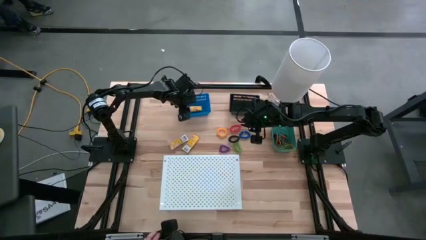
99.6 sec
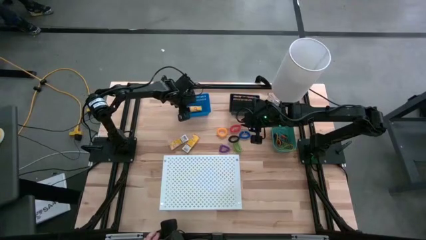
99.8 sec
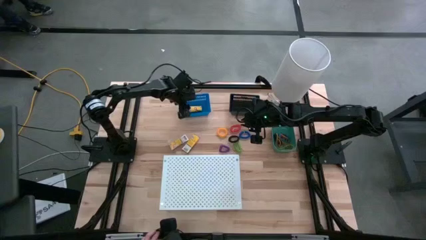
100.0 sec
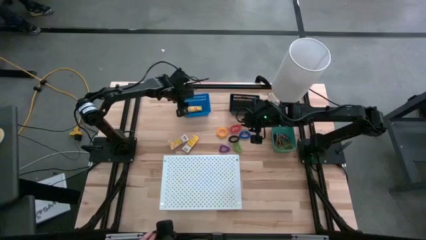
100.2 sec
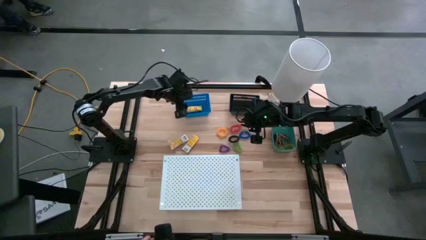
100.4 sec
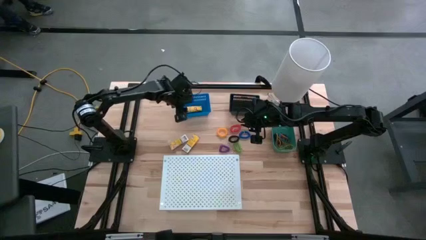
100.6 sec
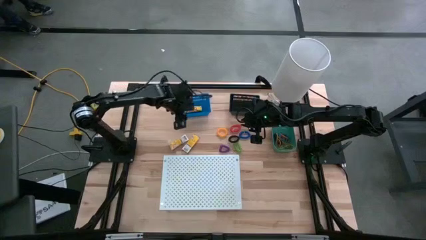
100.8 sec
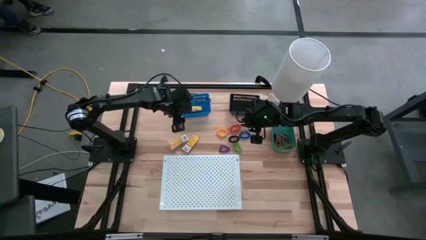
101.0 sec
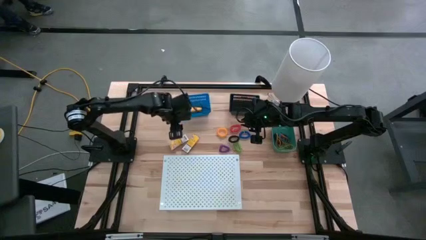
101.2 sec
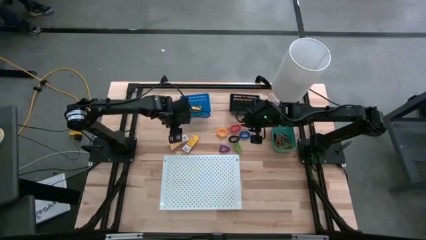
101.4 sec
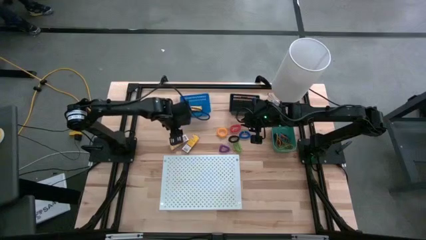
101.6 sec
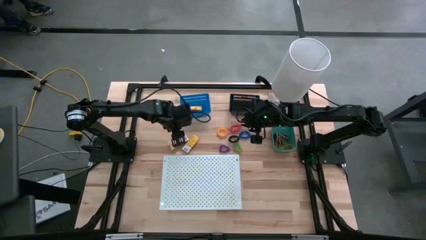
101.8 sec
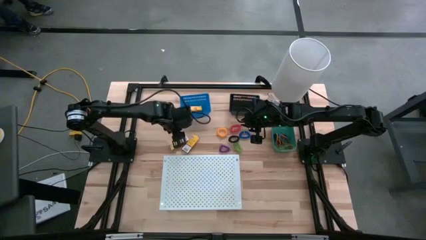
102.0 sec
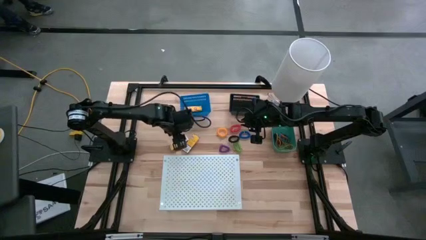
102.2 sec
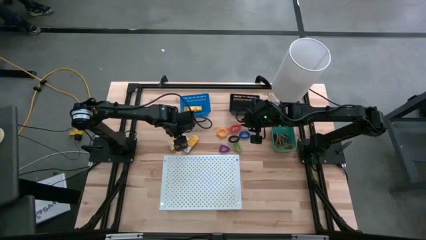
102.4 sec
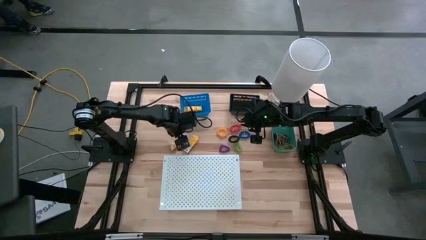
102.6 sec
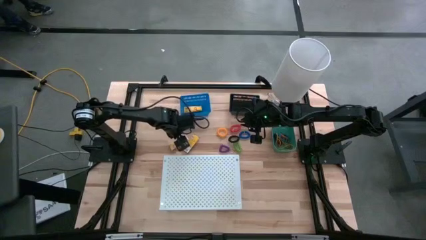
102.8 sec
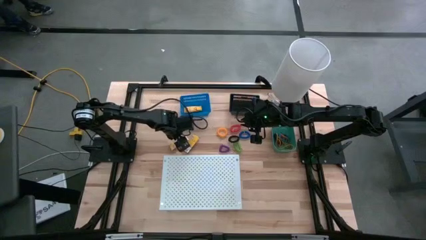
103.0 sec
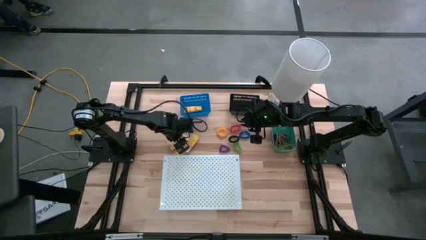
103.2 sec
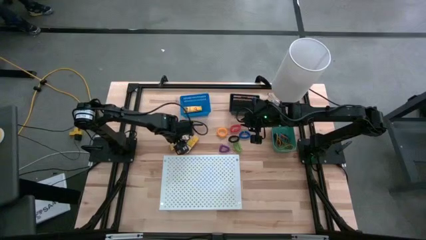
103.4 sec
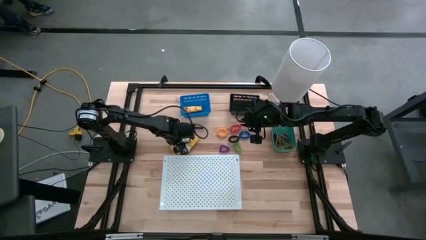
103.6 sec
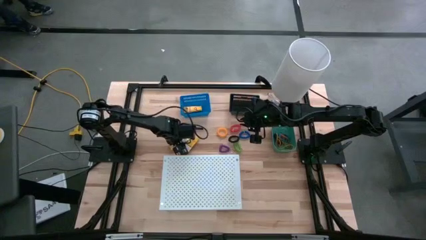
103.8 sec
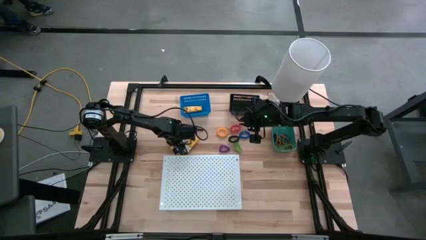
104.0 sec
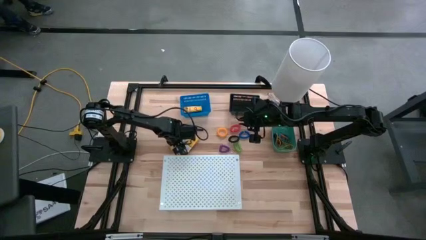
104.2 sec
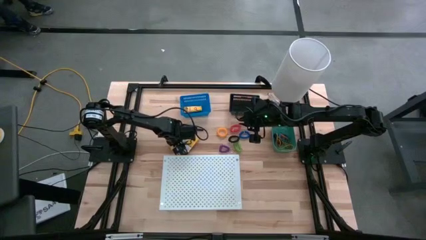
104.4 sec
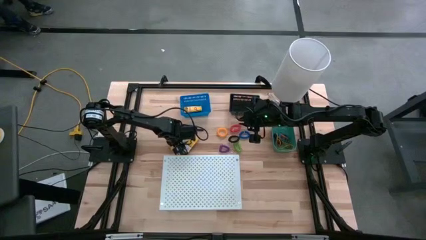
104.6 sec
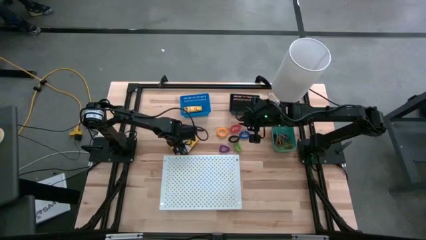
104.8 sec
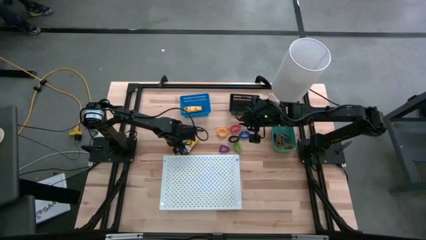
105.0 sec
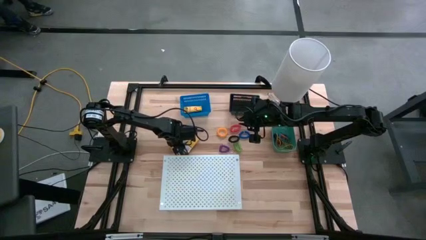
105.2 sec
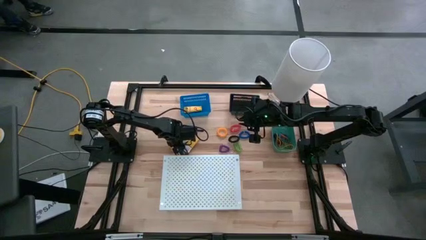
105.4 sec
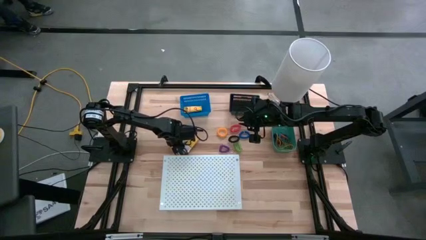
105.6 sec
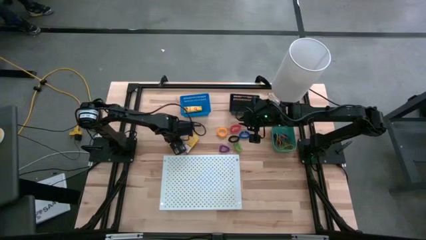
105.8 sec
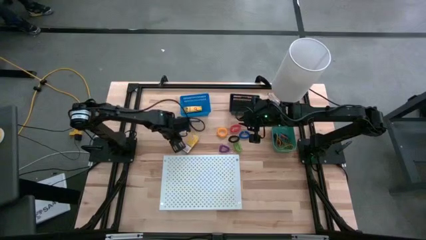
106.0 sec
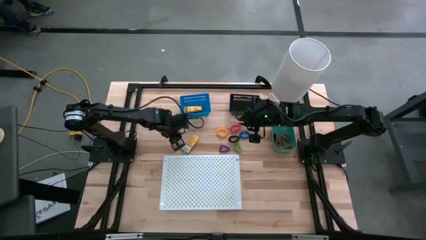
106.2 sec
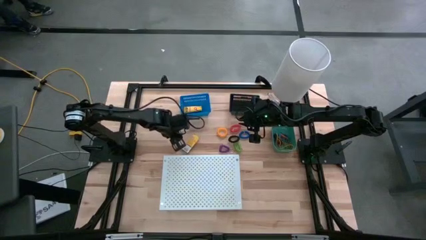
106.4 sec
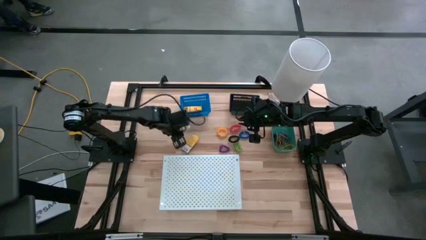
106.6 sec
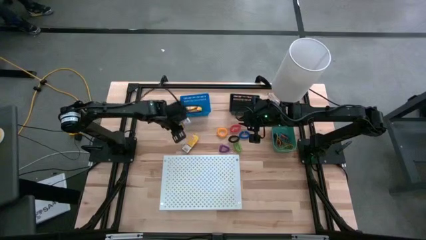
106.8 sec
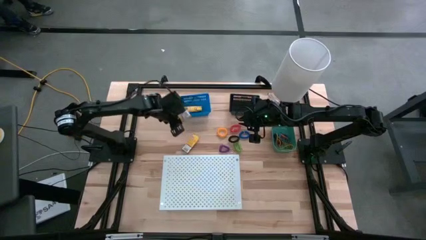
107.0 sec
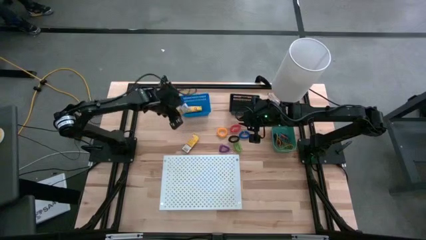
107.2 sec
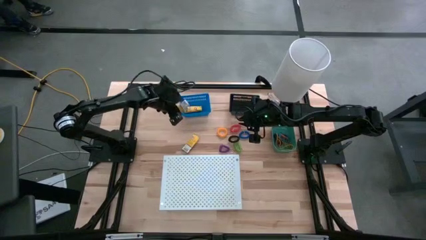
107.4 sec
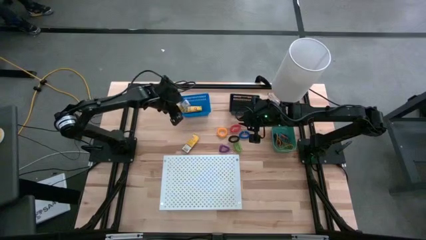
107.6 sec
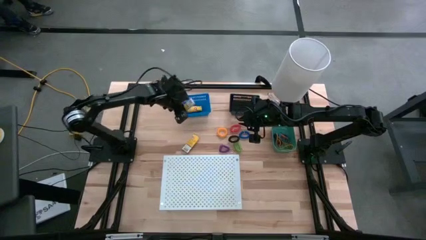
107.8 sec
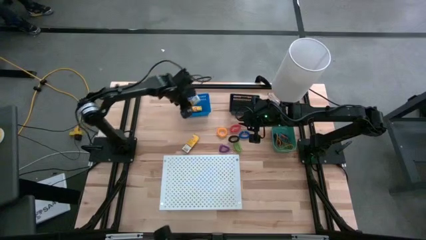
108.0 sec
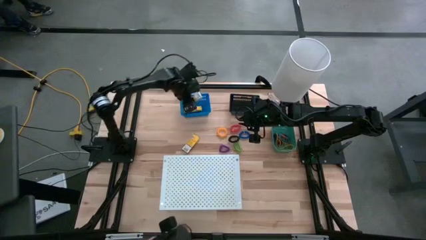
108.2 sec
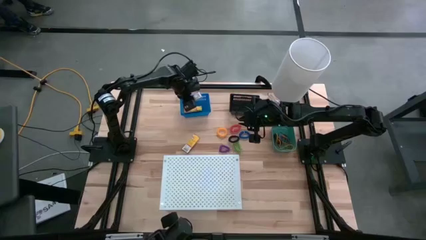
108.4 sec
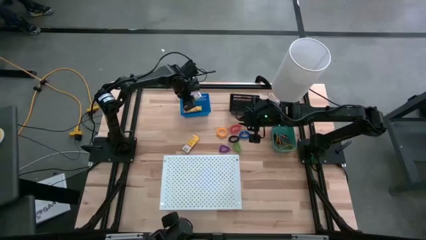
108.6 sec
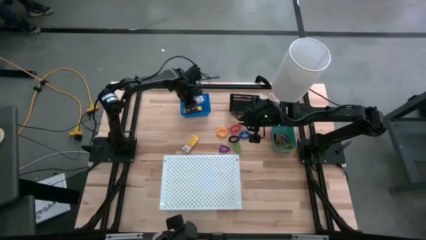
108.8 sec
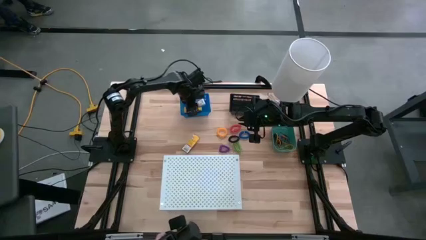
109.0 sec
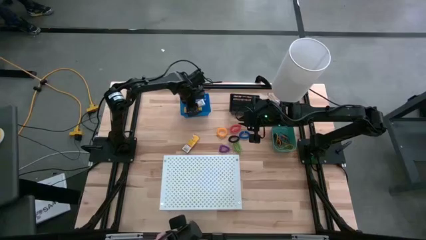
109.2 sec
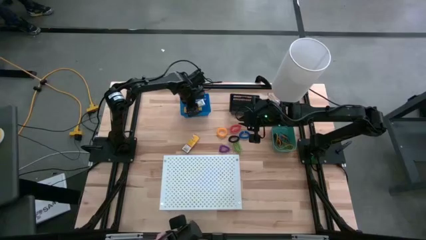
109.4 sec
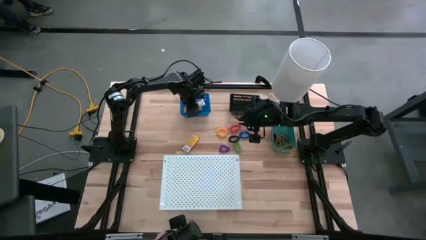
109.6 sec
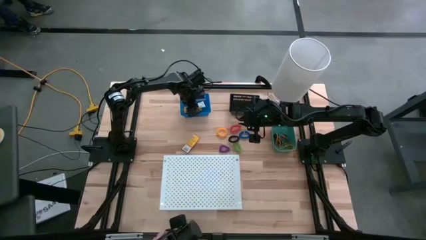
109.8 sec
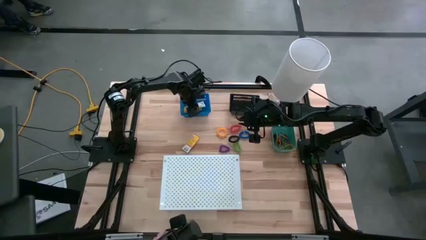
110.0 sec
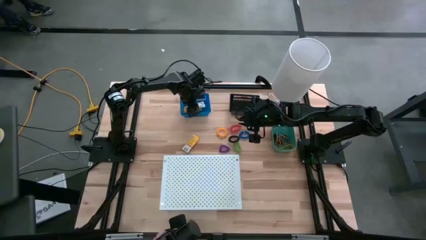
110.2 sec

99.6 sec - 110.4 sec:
Task: Pick & Place Office Desk Supplies
Put the left crayon box into the blue bin
